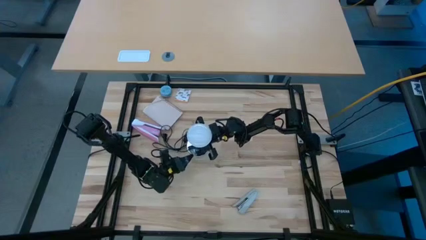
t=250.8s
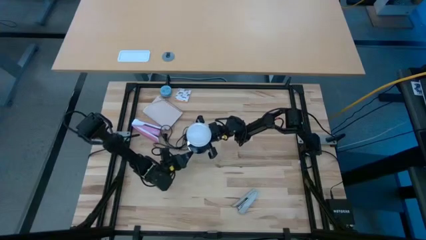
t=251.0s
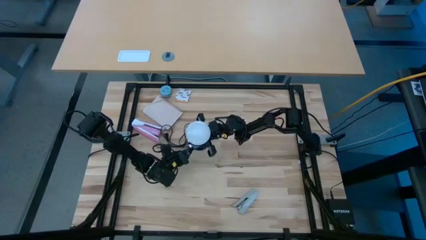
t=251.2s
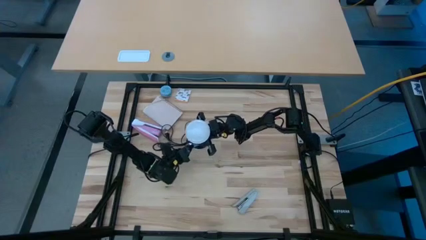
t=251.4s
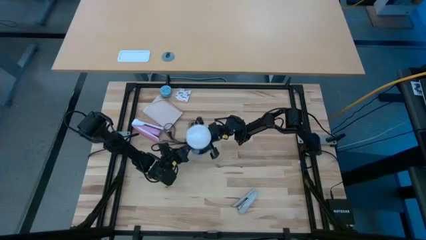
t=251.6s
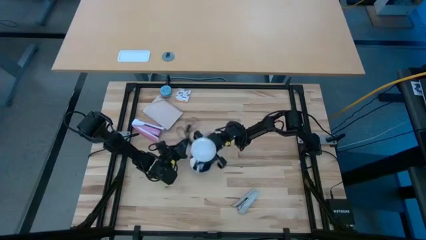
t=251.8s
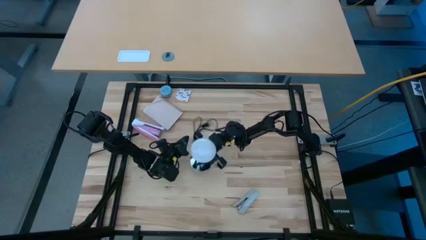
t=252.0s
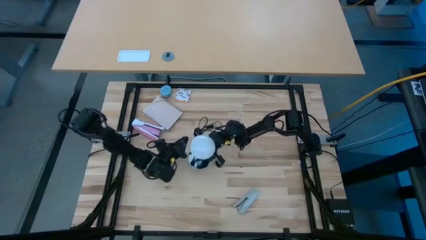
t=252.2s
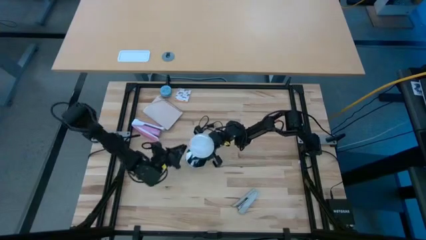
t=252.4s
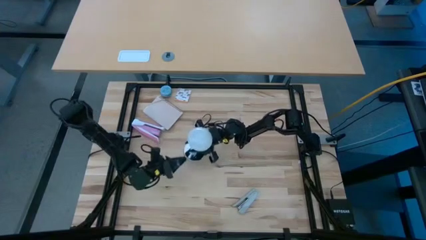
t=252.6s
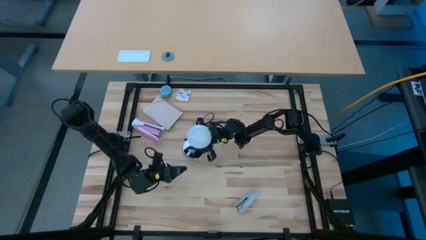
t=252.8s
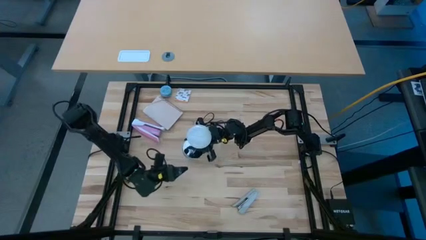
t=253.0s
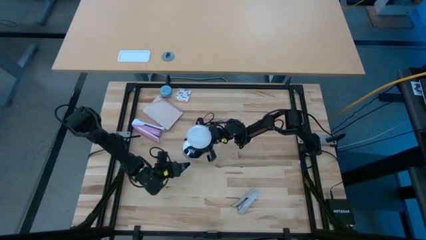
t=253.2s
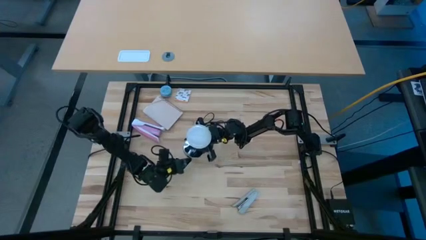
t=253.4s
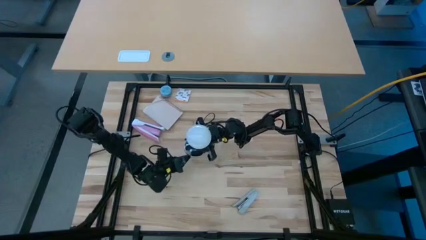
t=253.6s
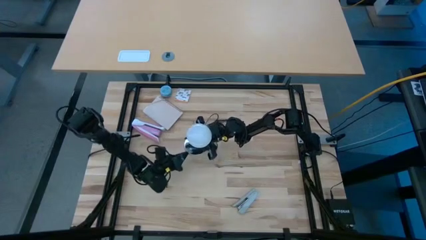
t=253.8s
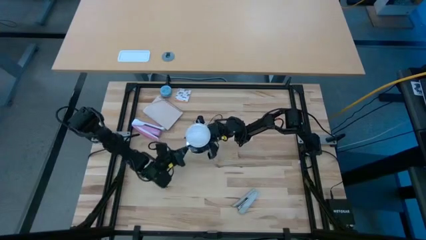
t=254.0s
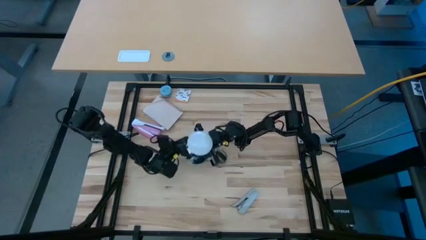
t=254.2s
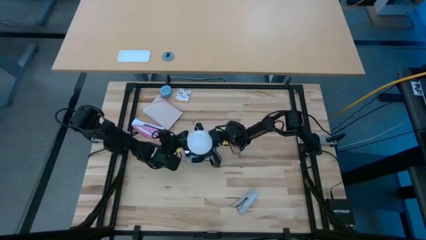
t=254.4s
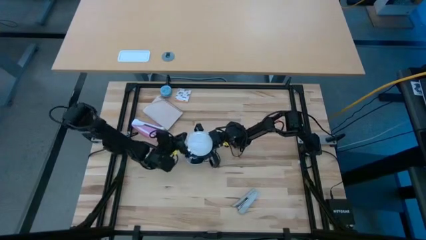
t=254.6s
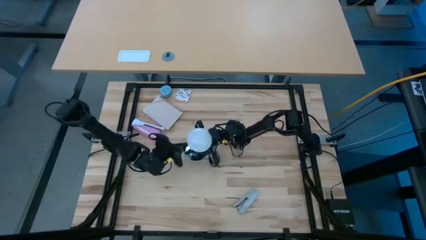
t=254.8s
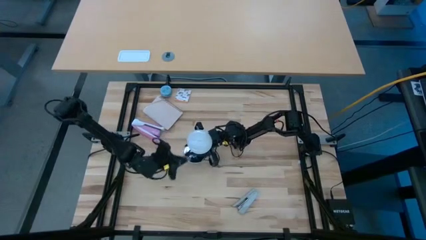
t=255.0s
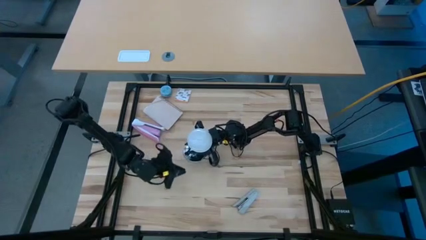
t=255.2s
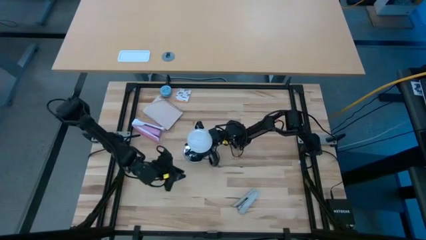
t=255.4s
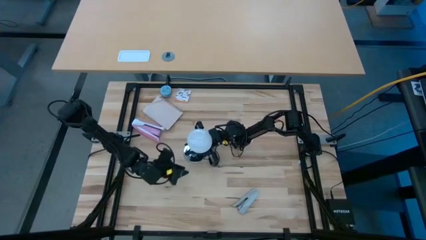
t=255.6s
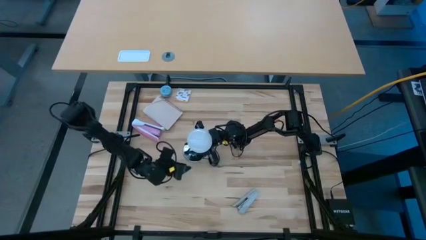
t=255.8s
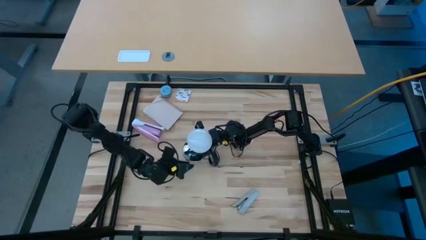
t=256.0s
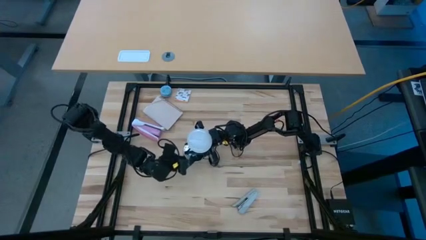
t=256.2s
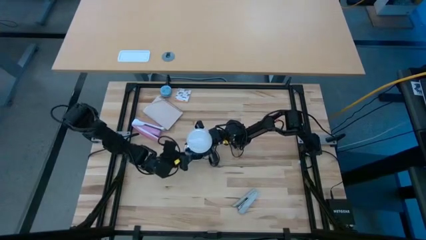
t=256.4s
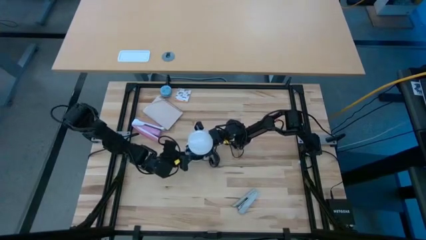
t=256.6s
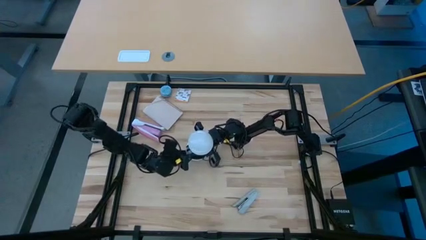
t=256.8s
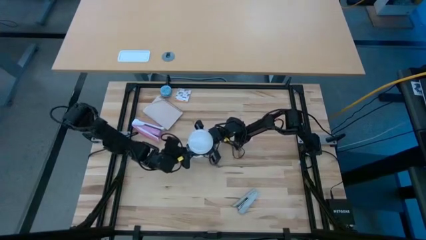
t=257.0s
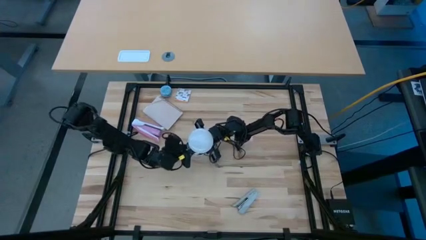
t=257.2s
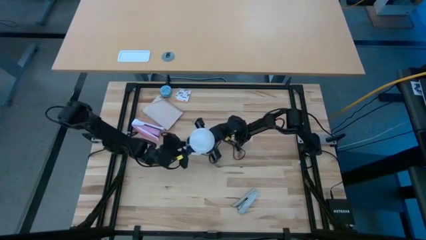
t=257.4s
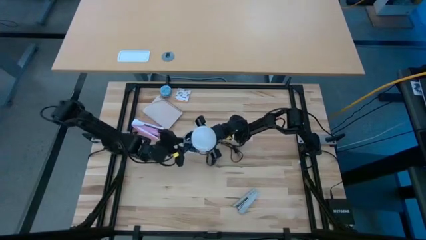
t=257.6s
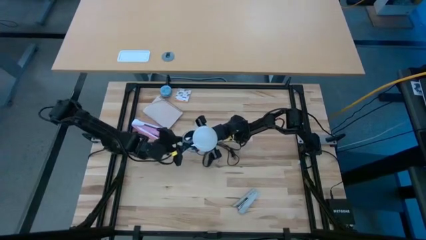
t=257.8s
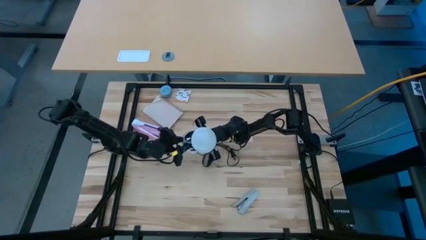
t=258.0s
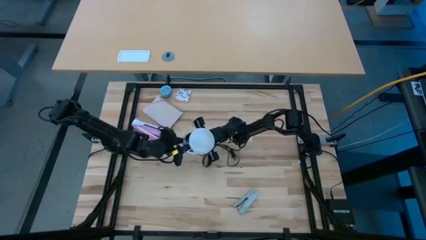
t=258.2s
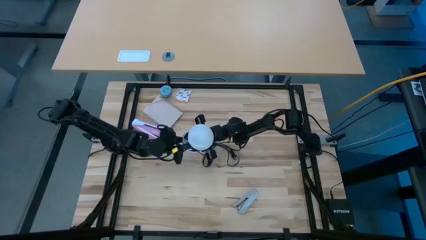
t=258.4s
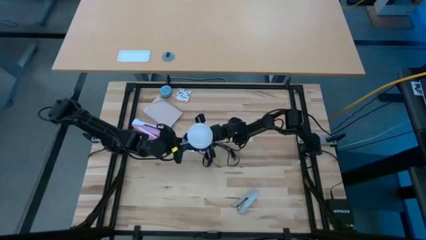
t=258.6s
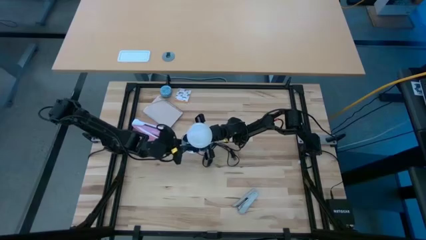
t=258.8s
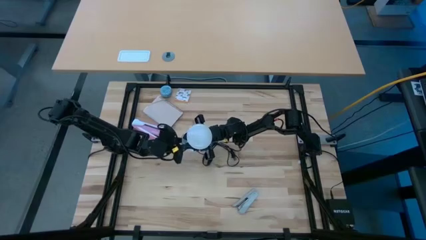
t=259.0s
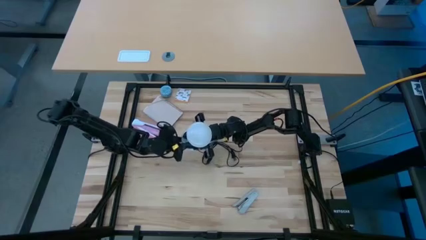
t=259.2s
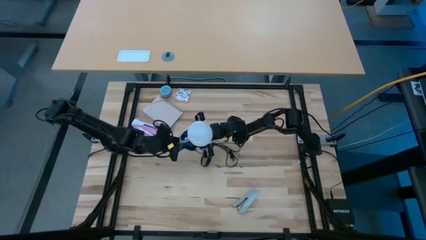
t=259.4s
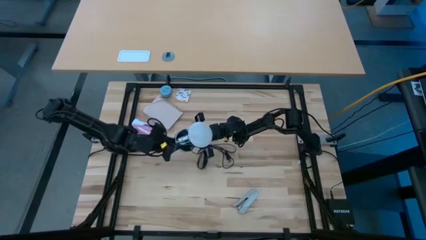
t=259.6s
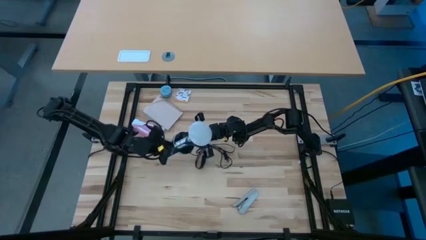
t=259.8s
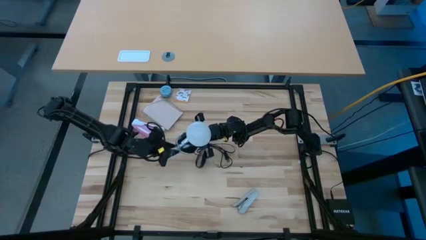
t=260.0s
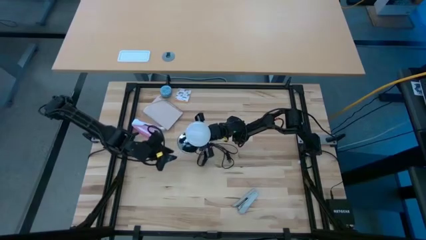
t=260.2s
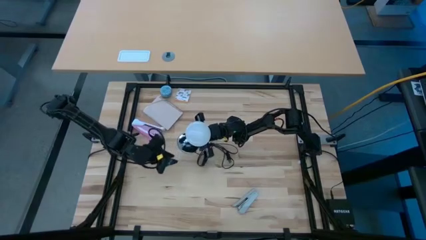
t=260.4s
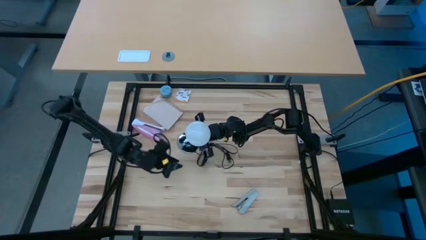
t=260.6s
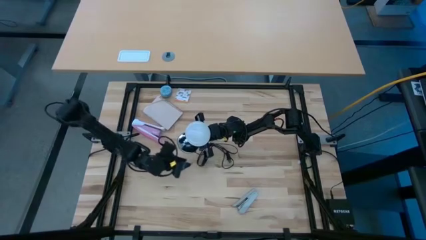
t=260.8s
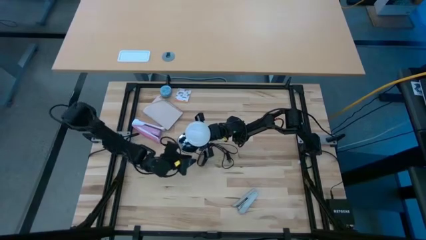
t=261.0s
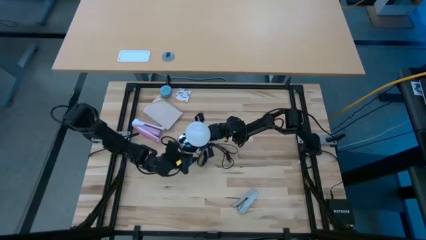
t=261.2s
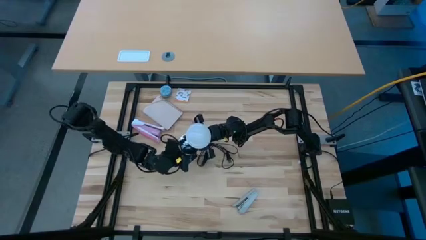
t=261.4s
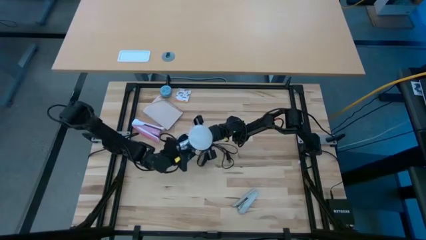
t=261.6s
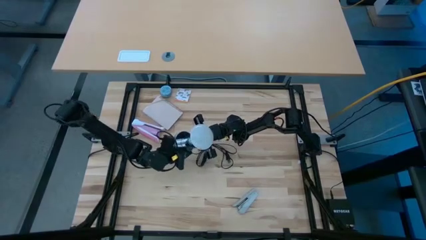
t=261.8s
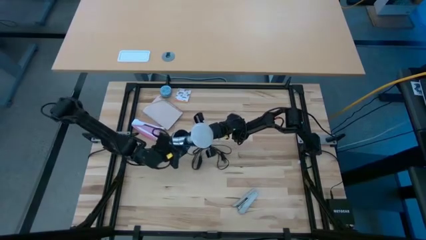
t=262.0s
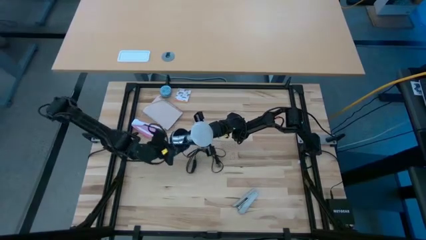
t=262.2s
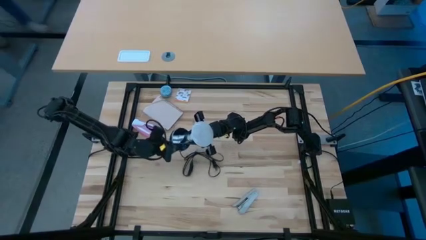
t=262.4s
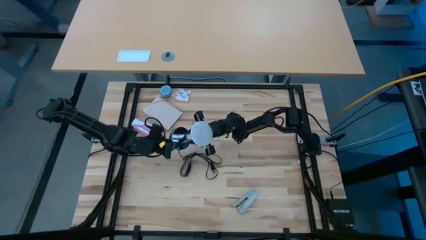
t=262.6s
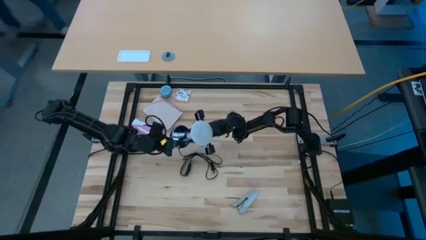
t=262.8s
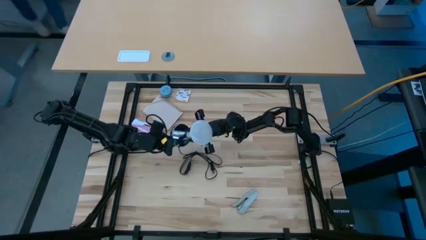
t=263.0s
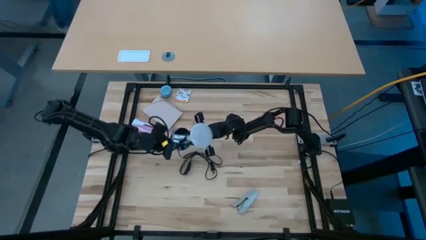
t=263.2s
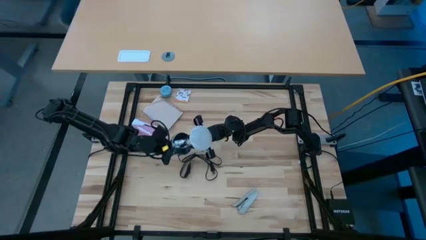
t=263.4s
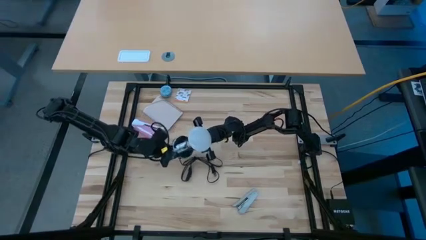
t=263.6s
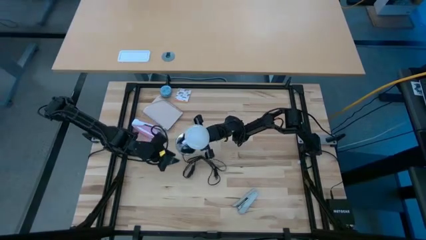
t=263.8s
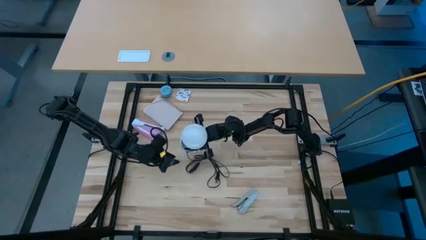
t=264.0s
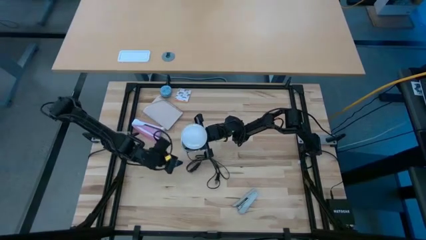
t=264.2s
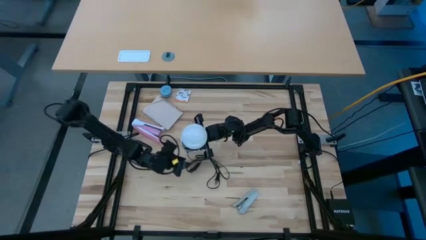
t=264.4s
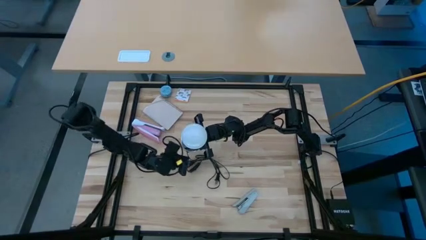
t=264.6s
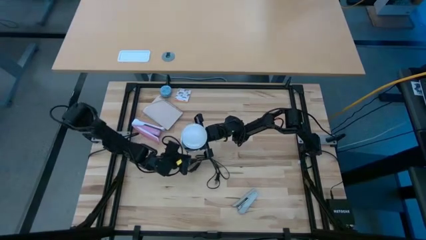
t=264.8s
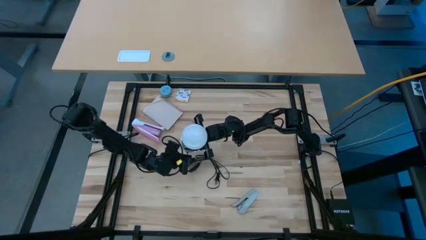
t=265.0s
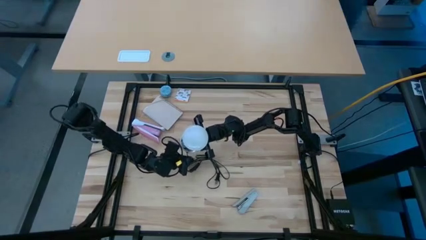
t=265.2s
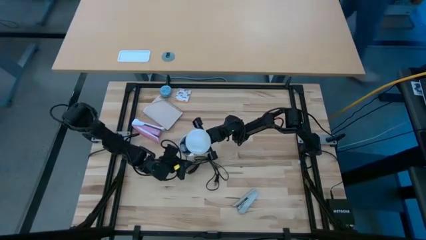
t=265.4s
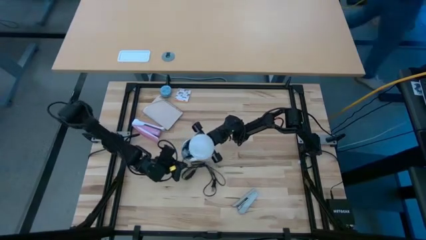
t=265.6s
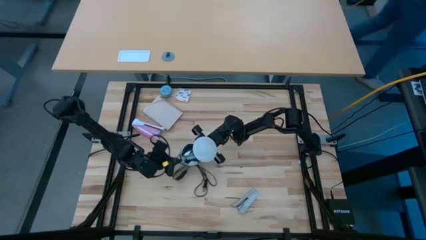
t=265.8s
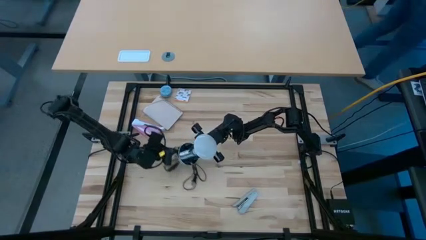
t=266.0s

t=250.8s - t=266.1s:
Task: Screw lightbulb
Remove the lightbulb from the lamp
